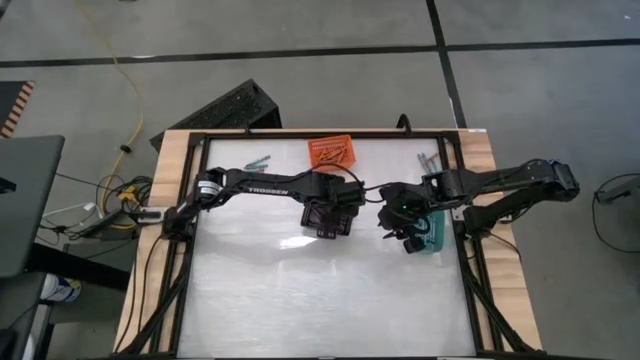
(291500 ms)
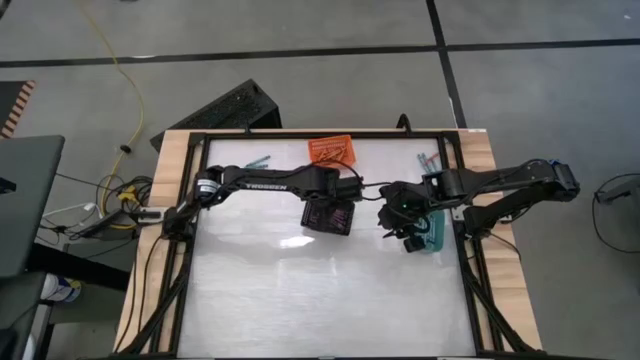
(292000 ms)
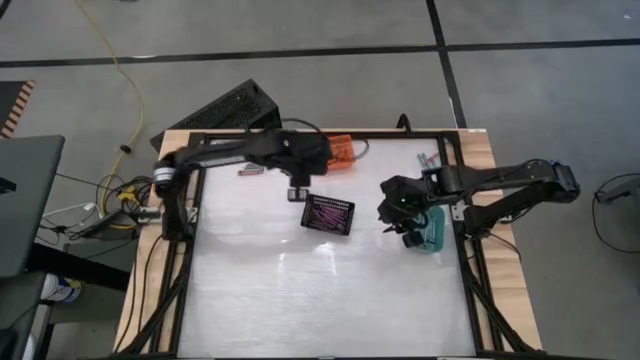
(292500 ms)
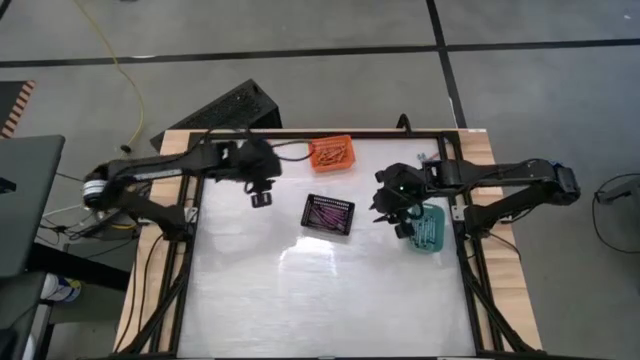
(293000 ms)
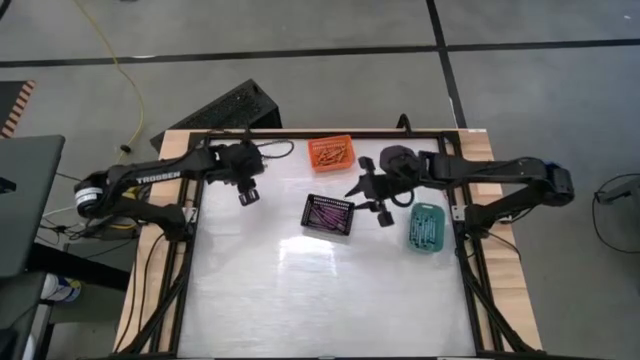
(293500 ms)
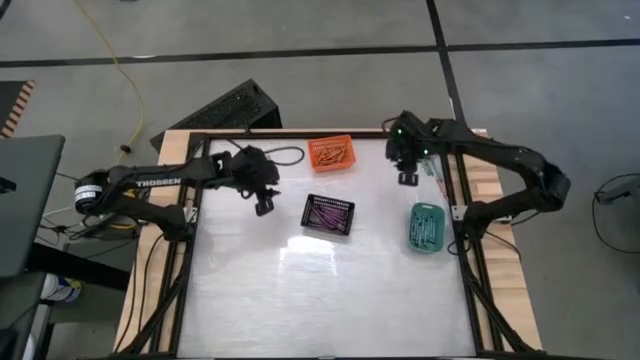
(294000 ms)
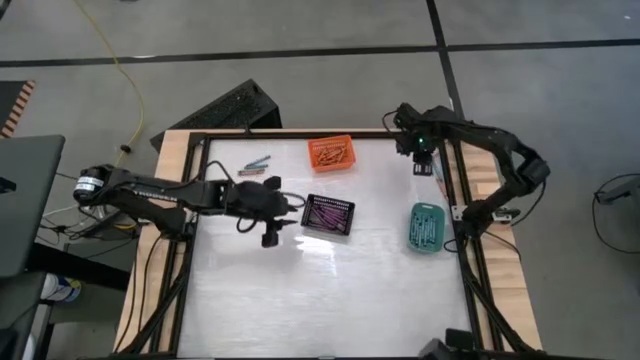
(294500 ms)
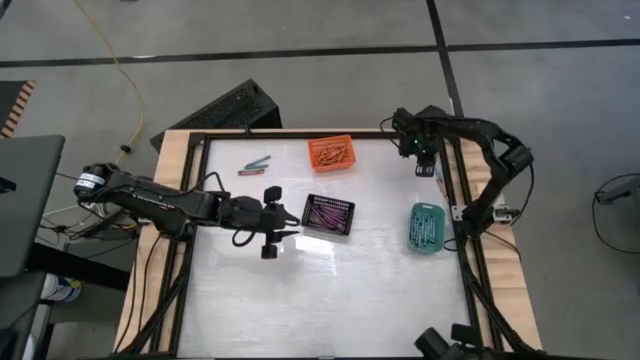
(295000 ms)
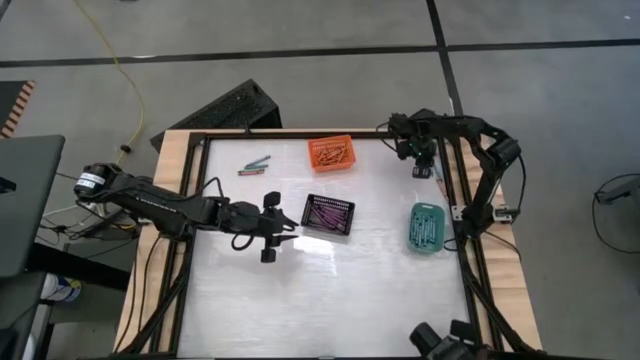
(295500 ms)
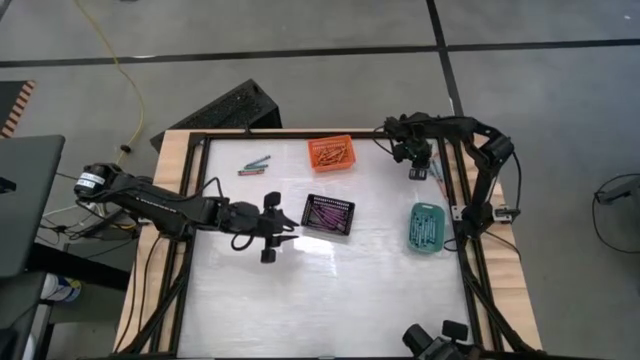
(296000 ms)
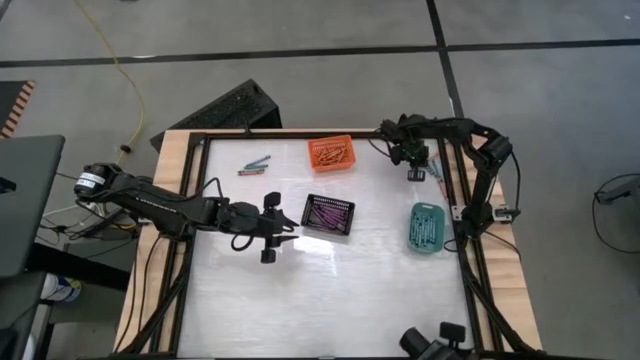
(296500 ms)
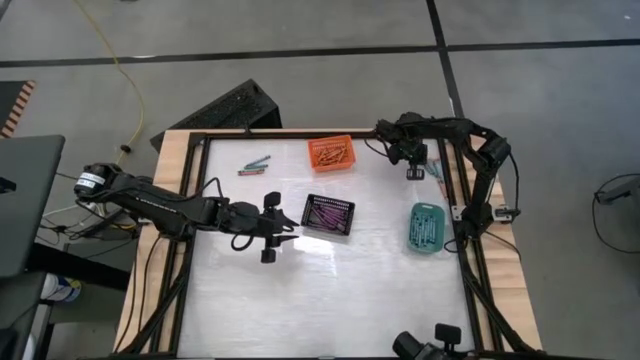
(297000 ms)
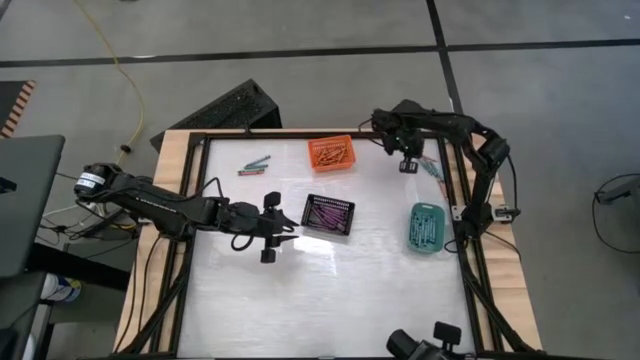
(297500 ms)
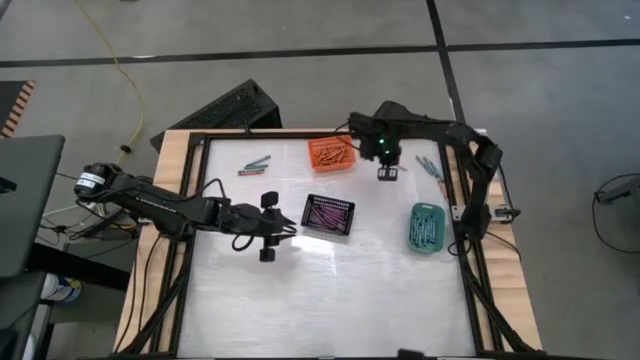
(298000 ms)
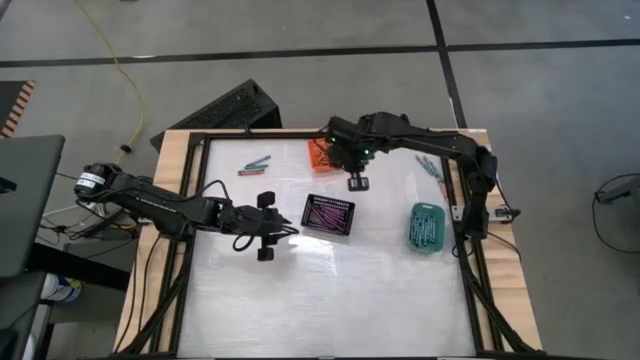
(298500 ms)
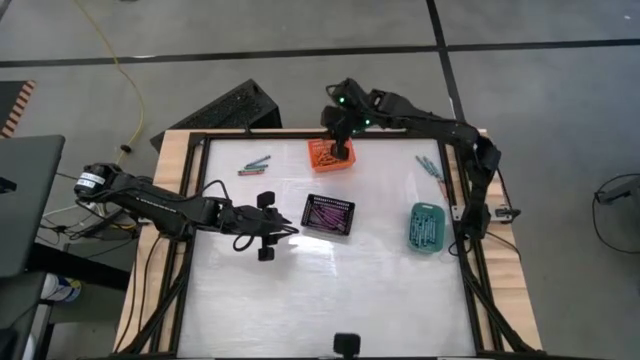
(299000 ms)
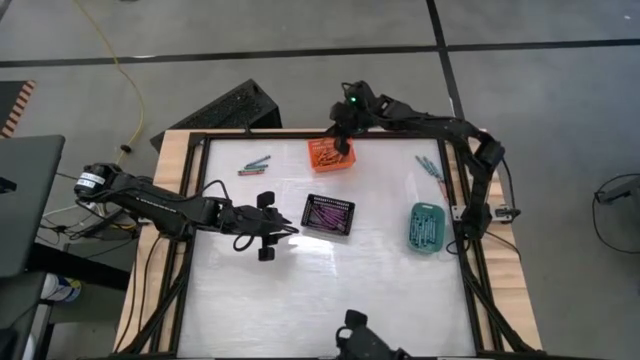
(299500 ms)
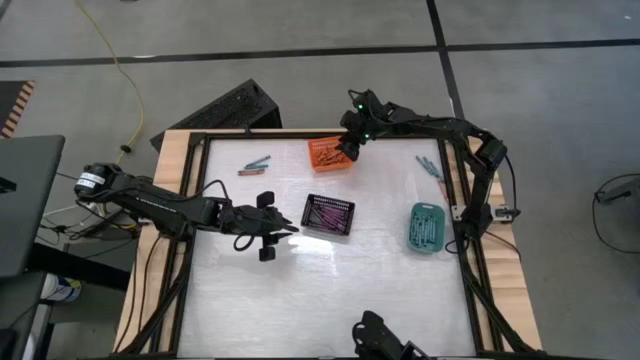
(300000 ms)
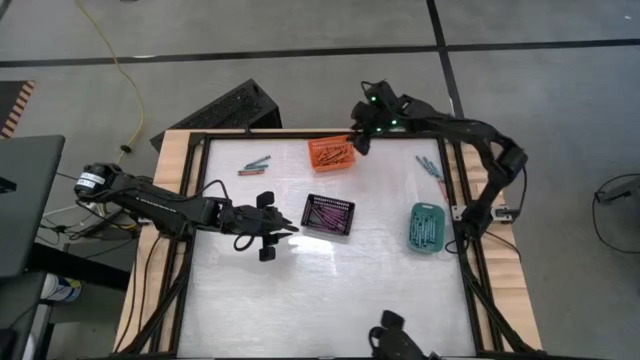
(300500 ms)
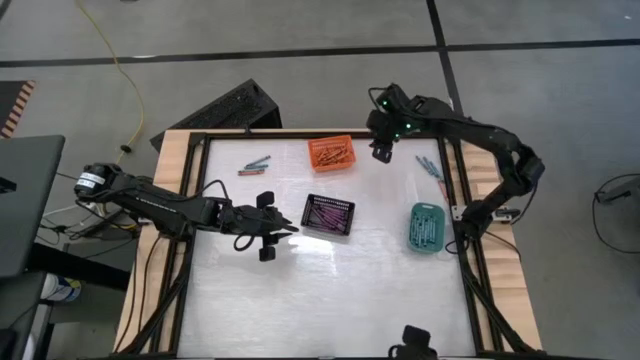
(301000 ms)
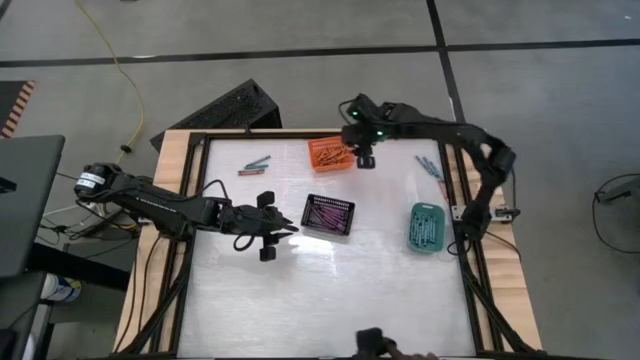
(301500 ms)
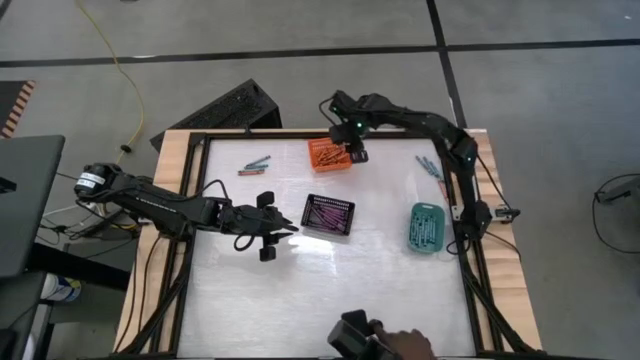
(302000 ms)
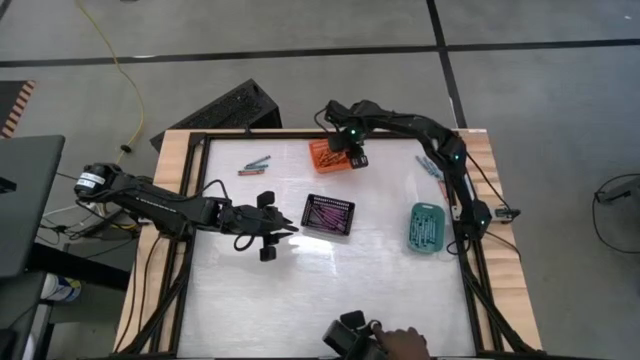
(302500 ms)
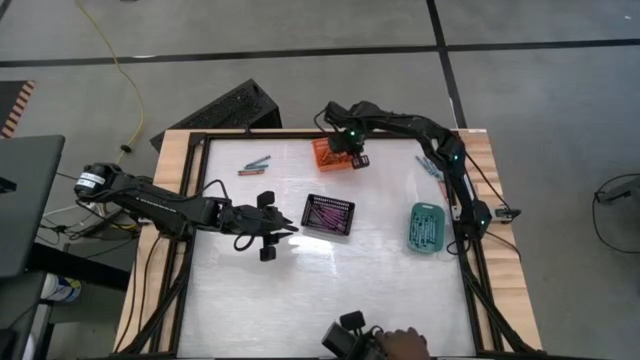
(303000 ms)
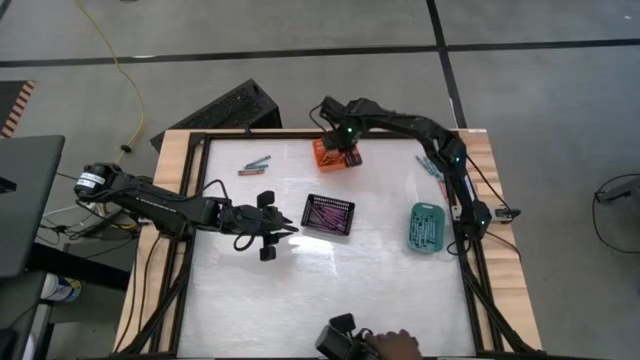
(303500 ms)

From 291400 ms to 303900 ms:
Task: Sort crayons
Put the orange crayon into the orange bin

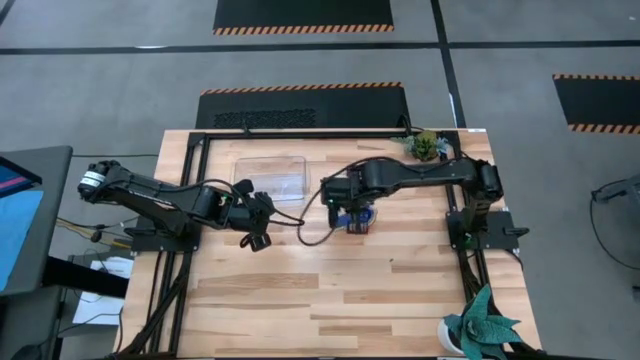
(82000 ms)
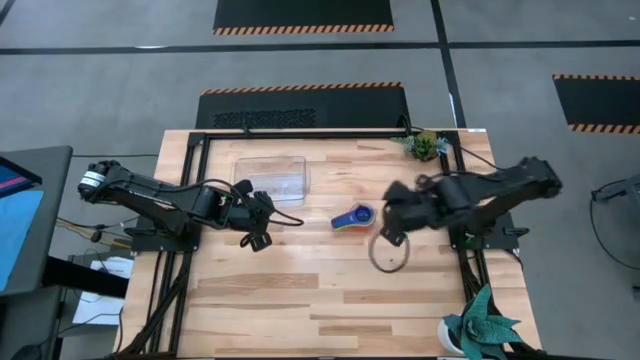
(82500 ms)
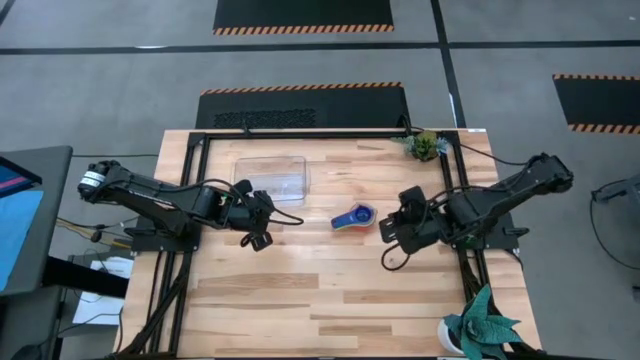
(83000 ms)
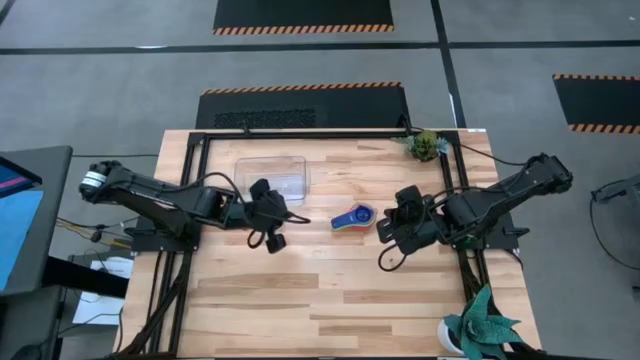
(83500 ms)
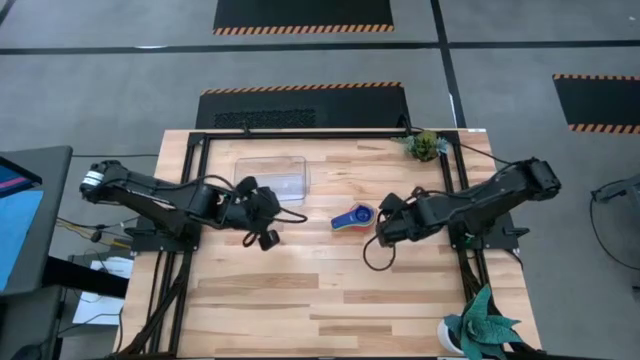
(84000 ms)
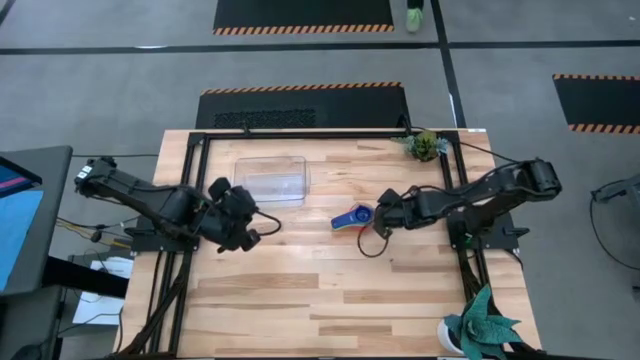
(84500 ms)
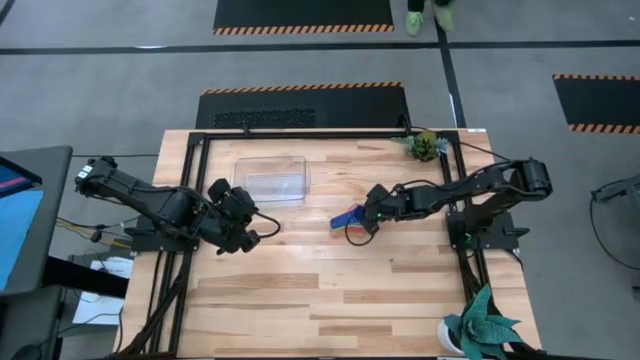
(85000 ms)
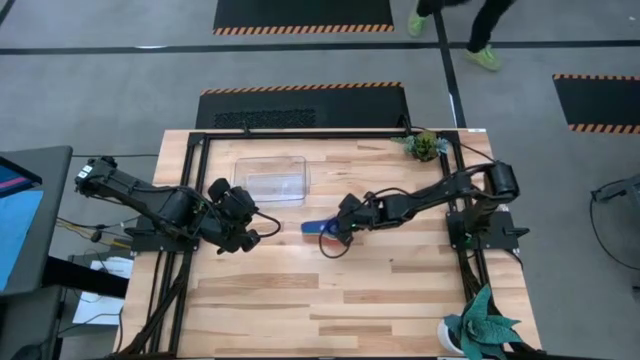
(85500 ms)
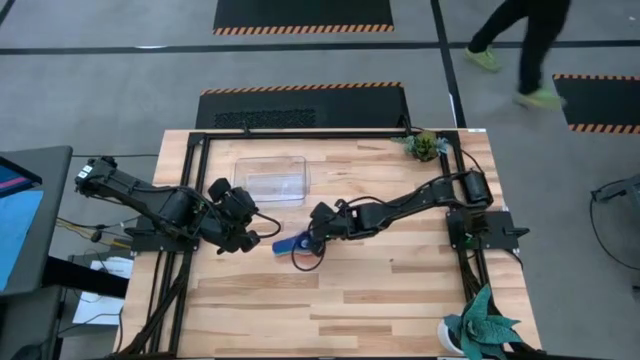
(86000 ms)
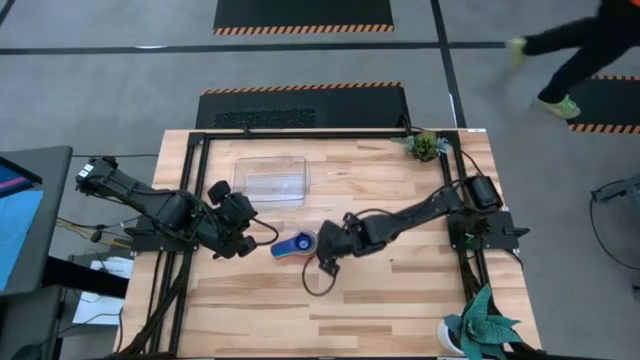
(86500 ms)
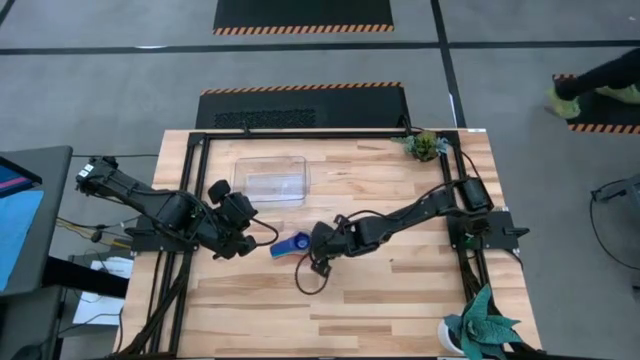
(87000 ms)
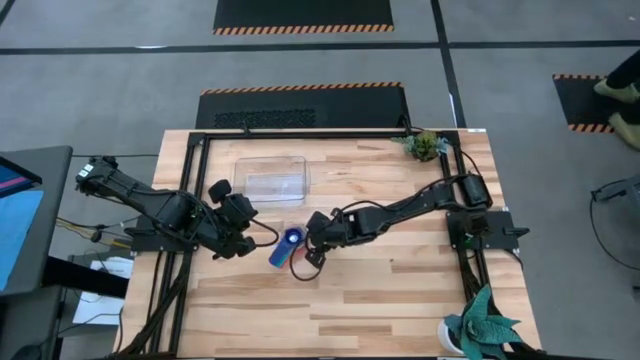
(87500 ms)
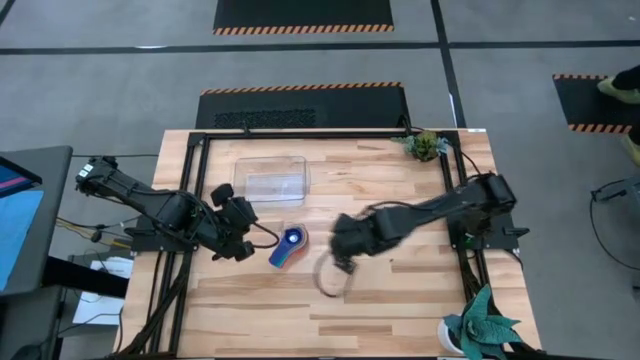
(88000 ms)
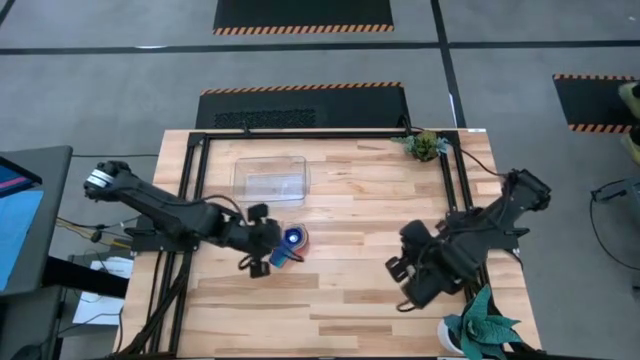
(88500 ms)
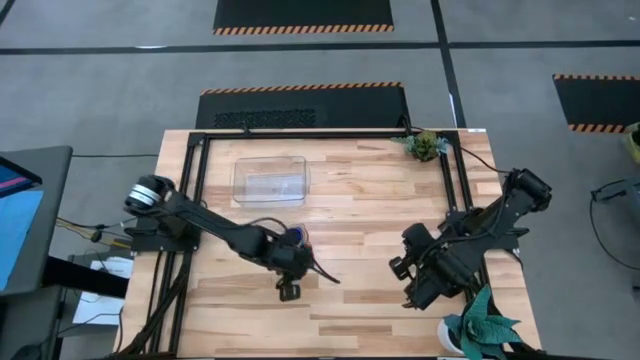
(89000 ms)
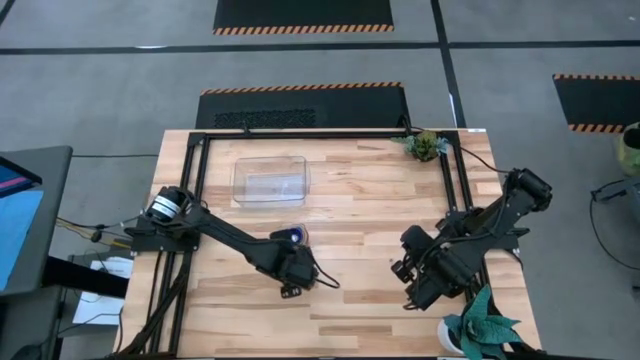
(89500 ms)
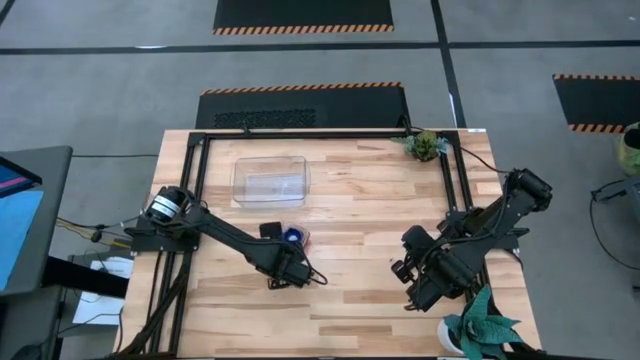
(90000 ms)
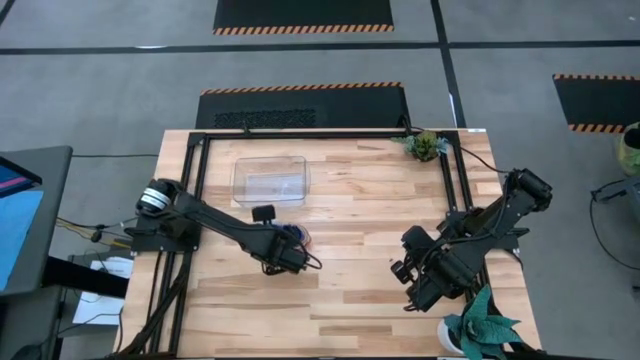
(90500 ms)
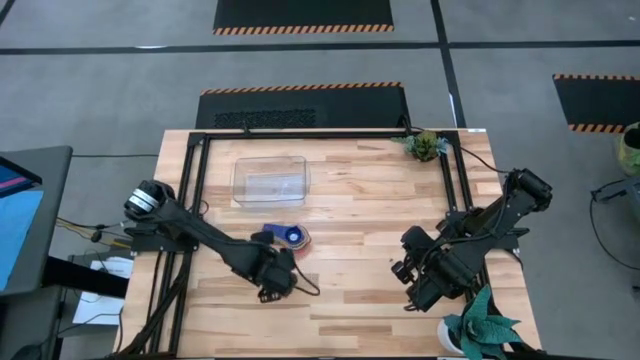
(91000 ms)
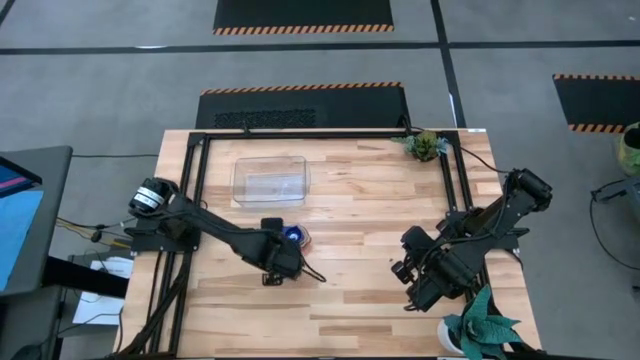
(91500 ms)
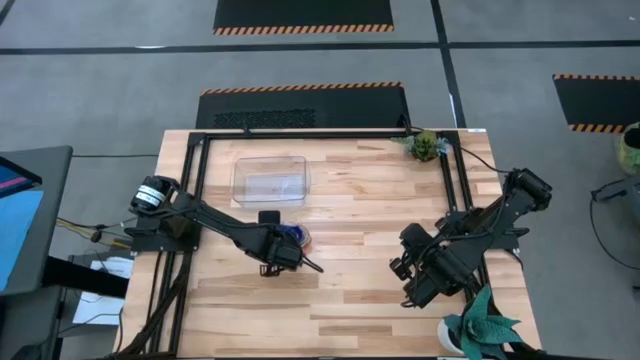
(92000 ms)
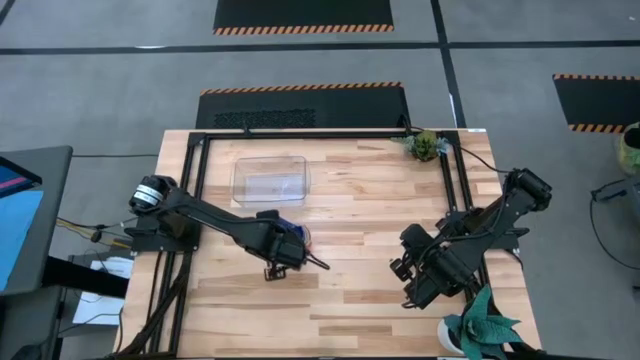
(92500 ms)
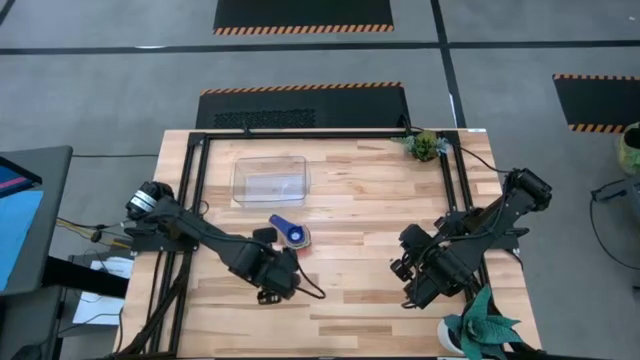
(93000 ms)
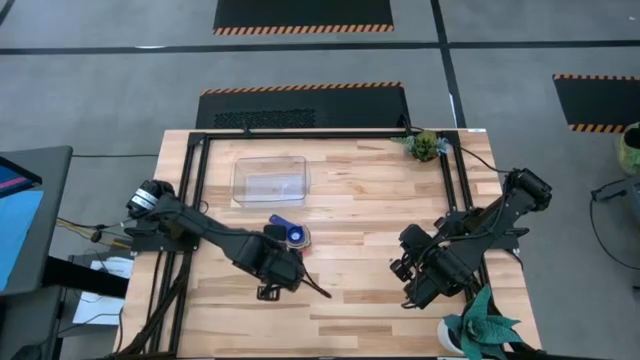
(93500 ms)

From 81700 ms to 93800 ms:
Task: Nest measuring cups in basket
Put the stacked measuring cups into the transparent bin
